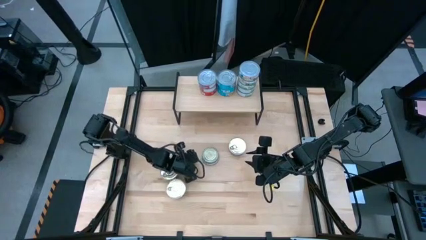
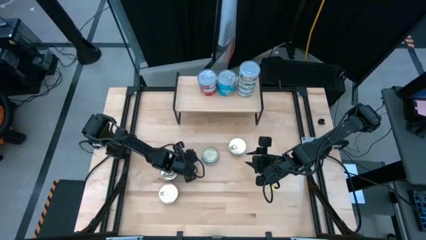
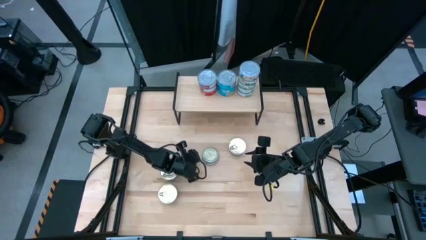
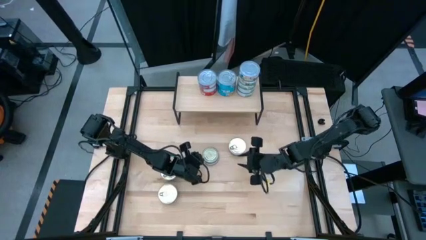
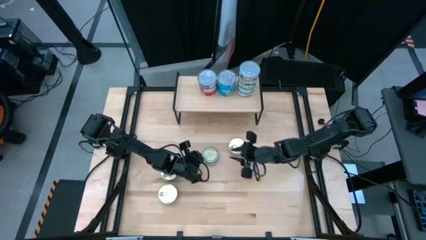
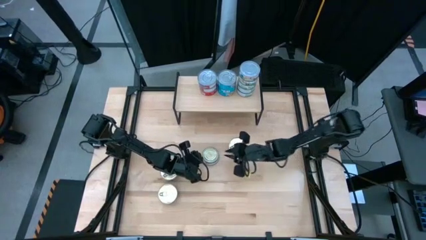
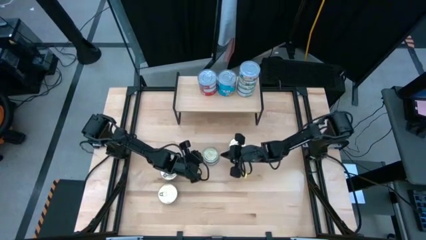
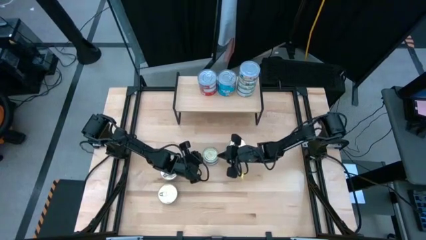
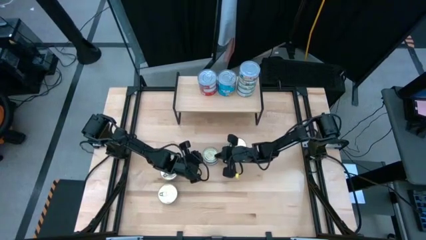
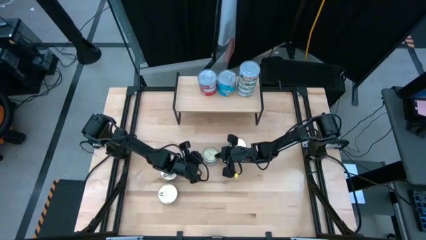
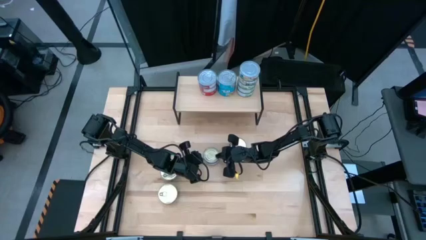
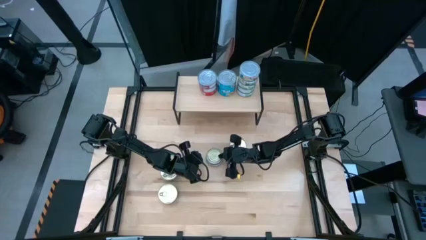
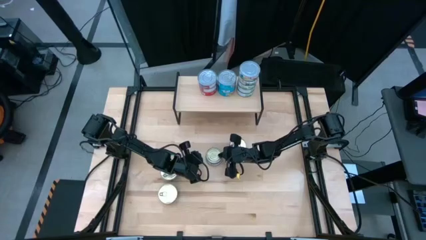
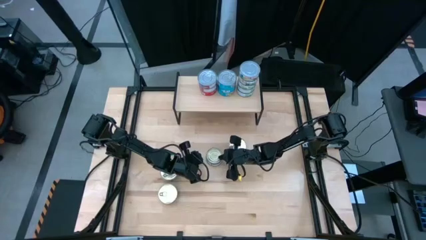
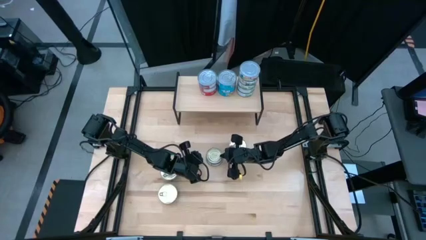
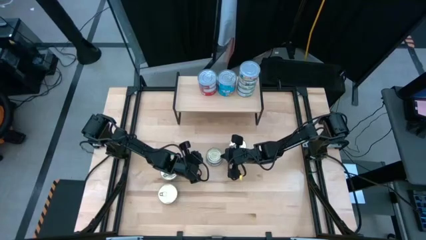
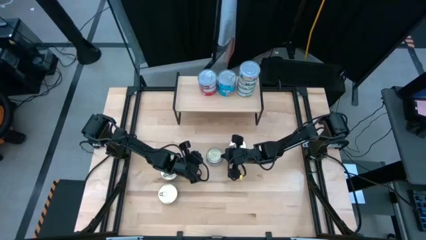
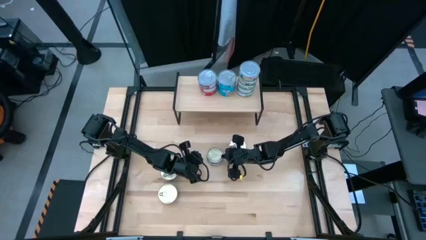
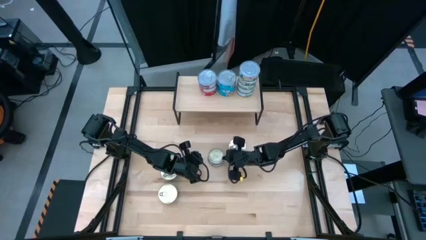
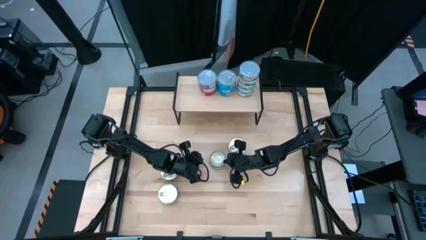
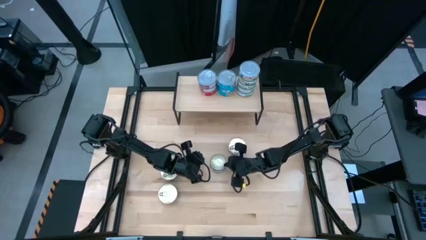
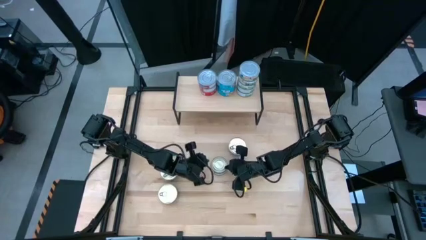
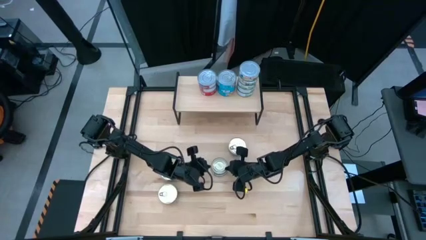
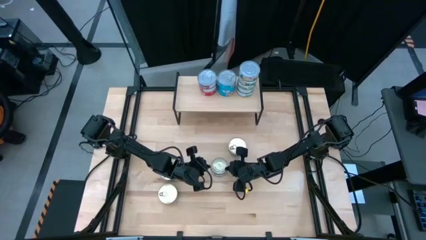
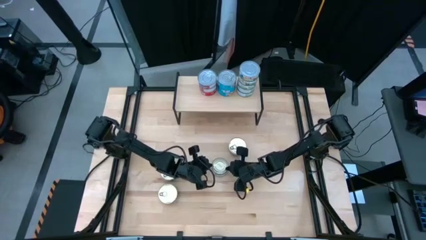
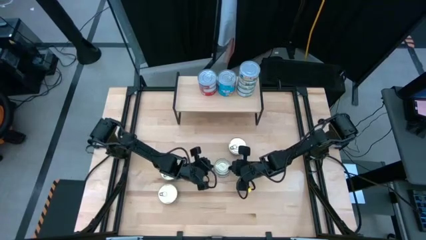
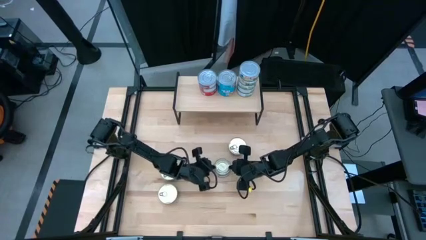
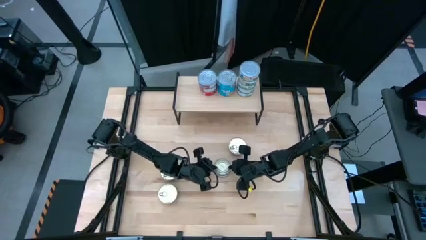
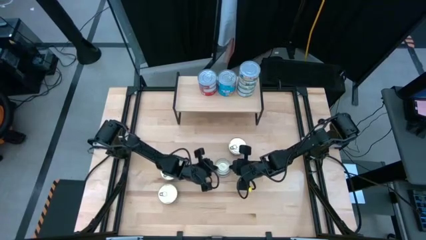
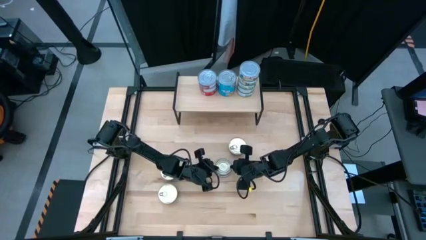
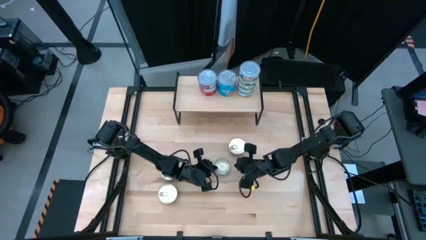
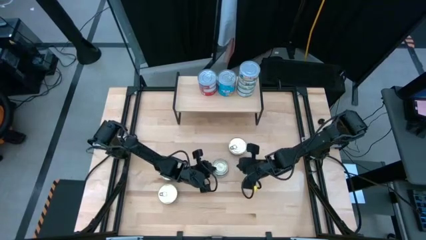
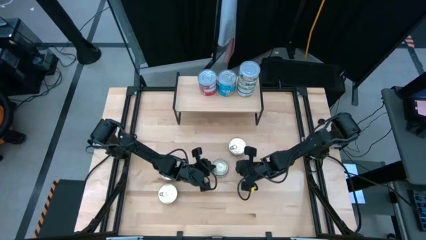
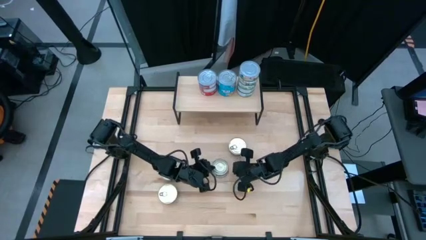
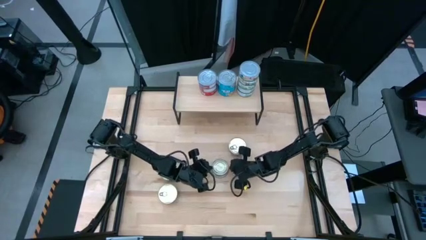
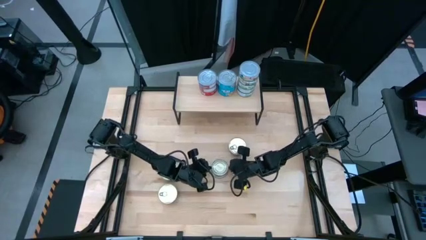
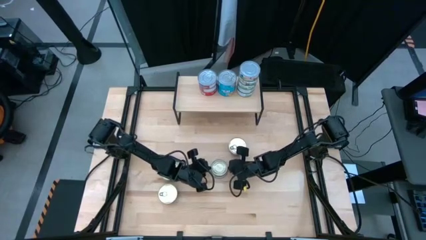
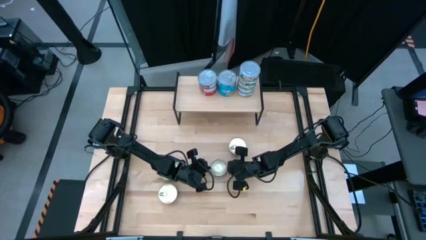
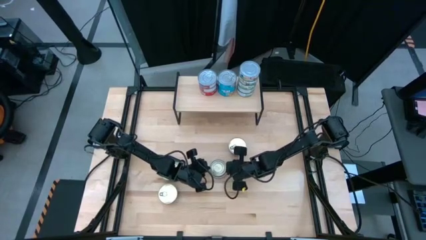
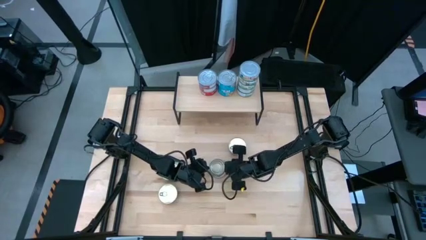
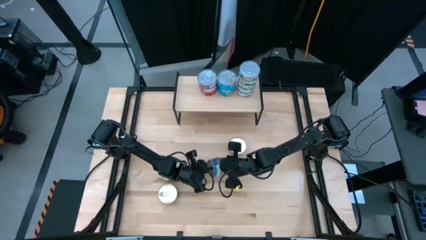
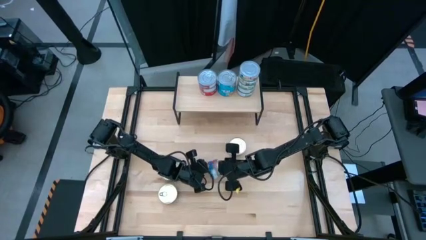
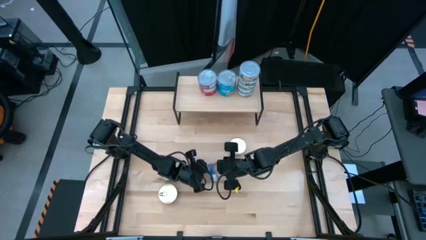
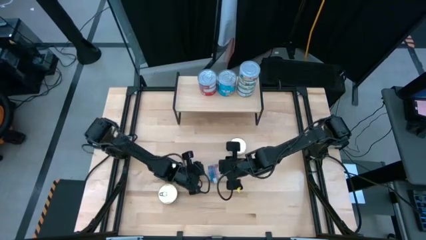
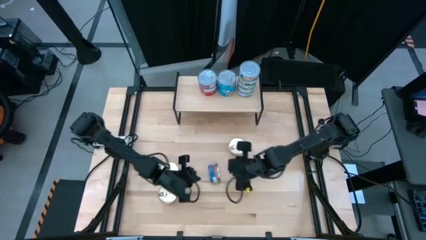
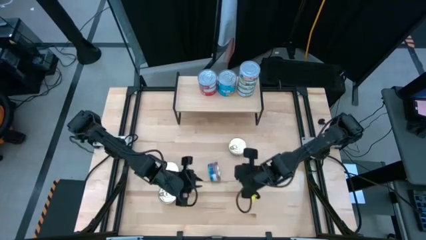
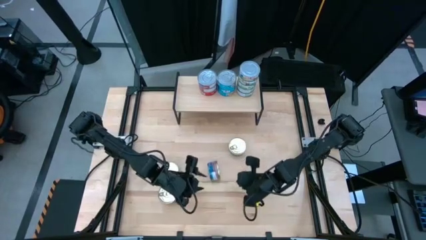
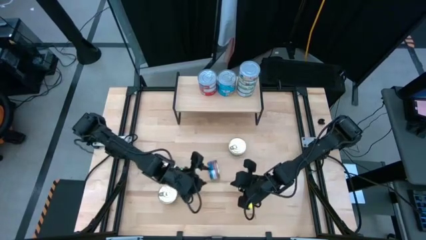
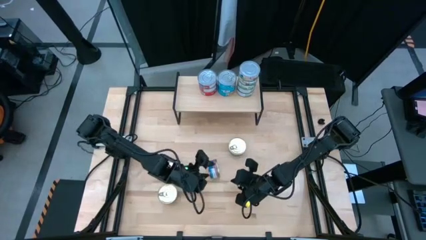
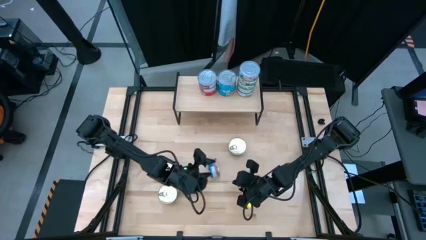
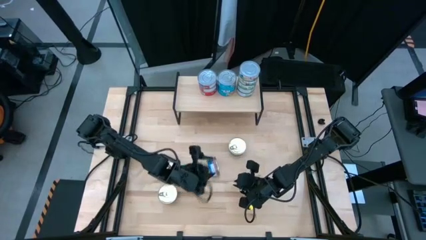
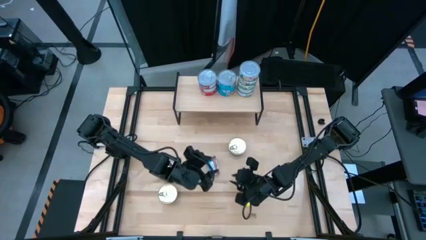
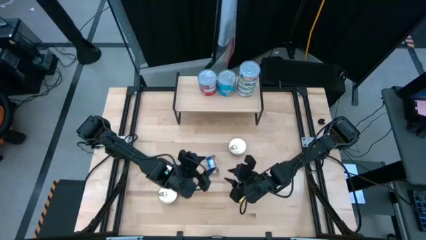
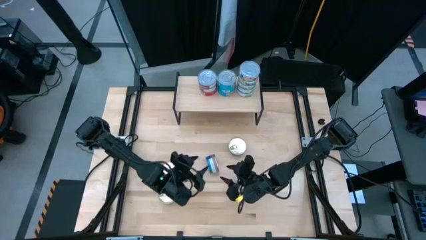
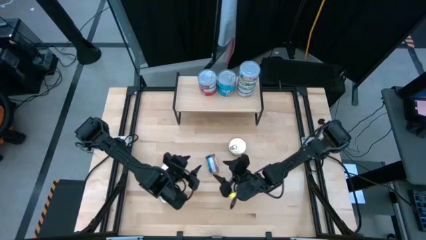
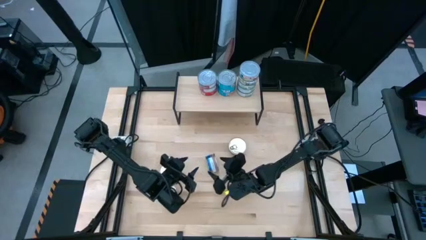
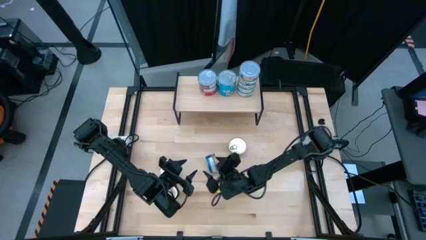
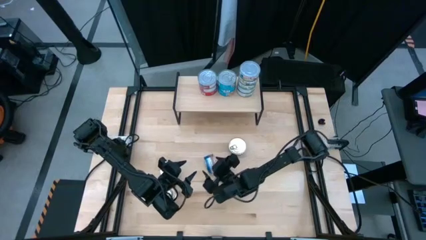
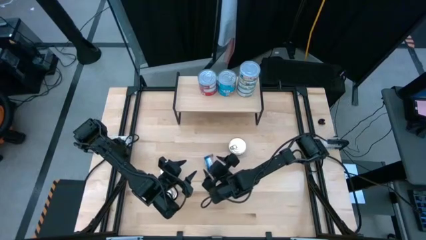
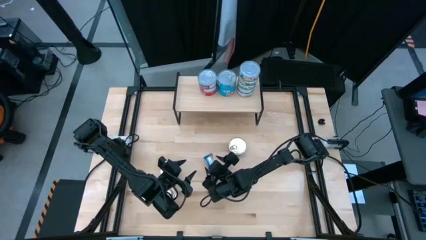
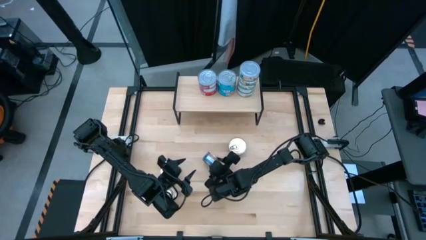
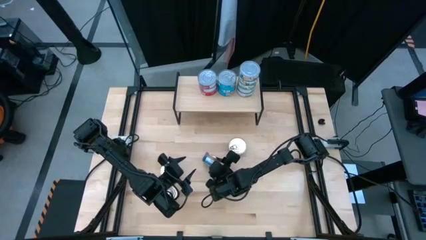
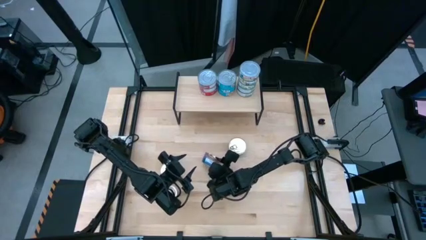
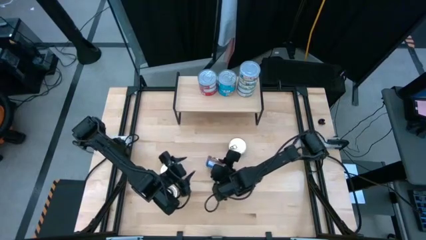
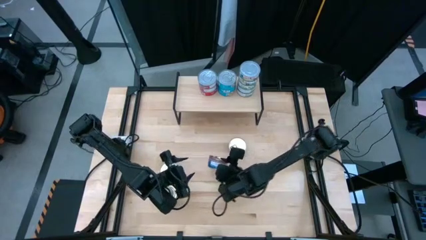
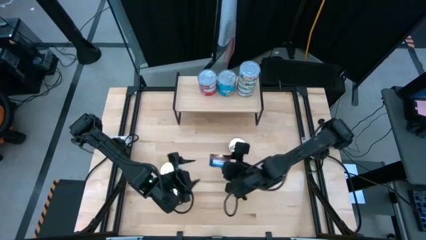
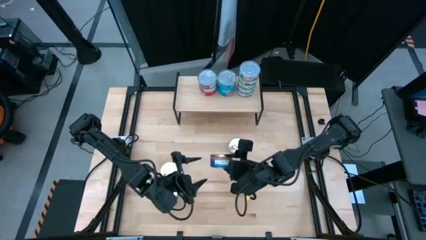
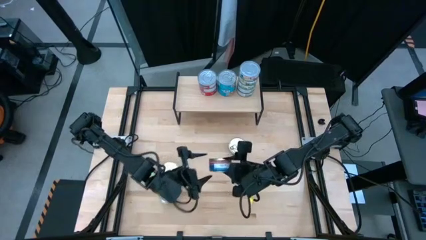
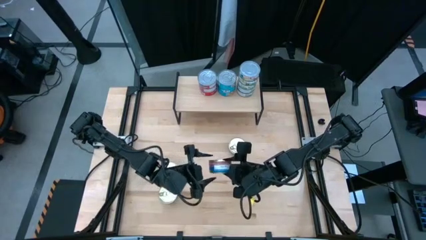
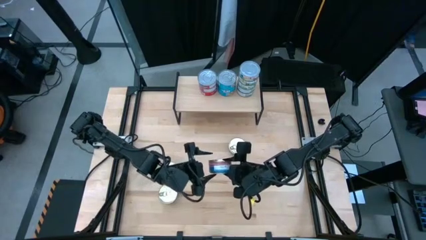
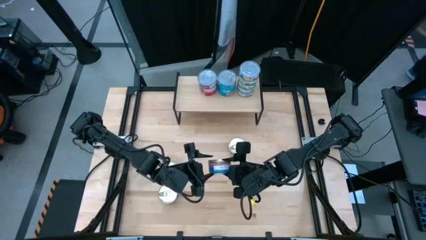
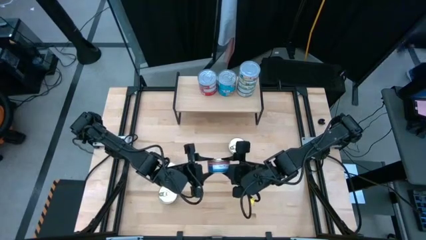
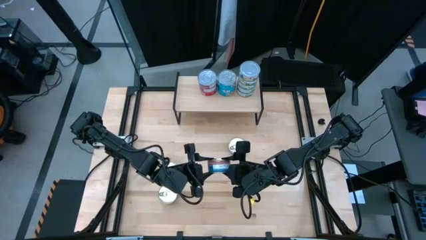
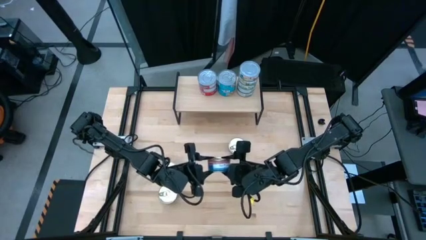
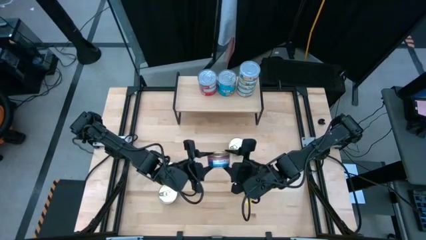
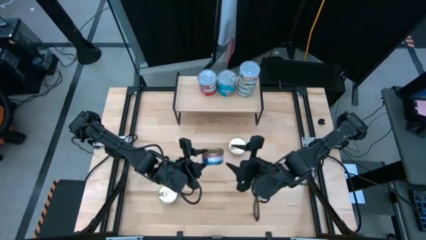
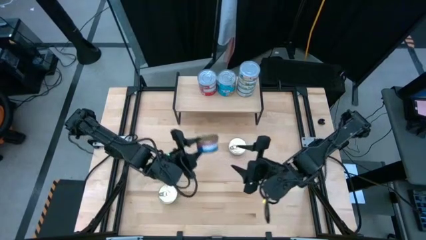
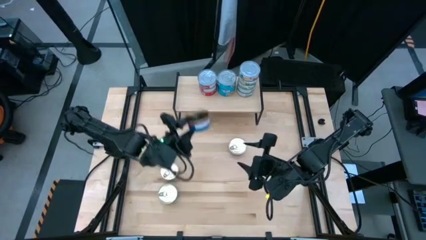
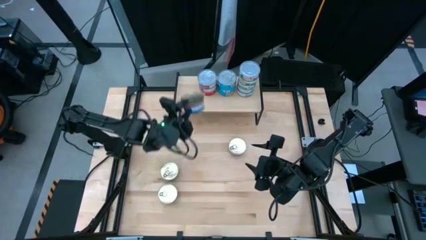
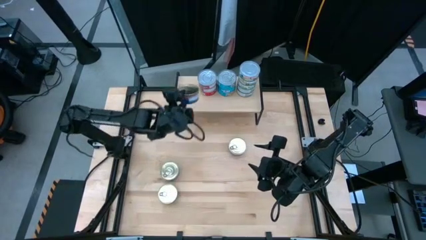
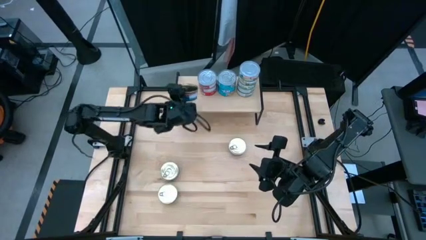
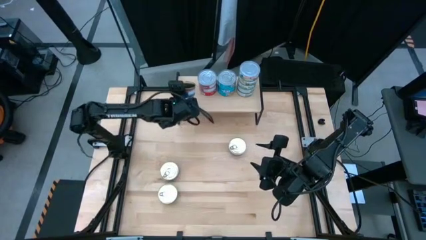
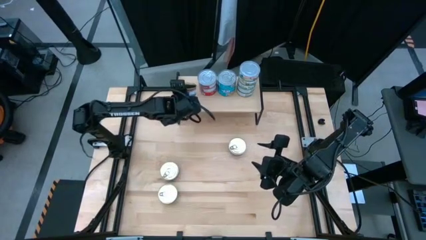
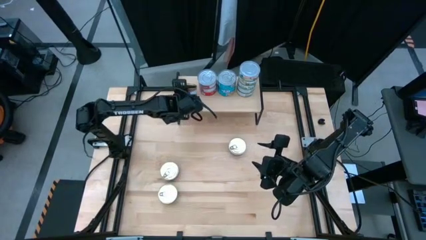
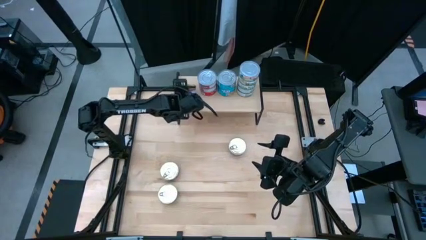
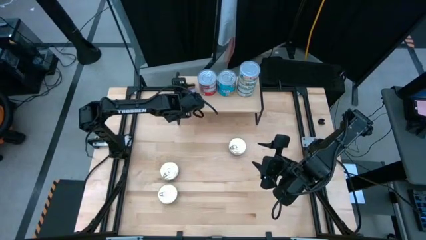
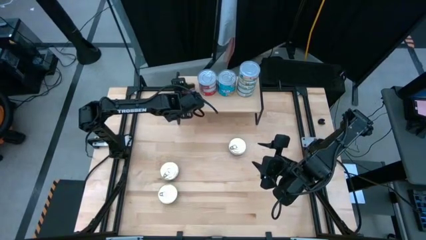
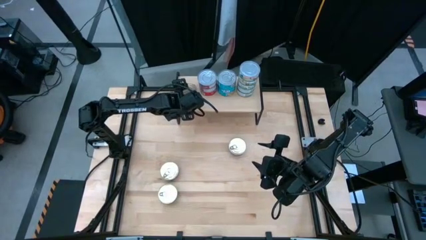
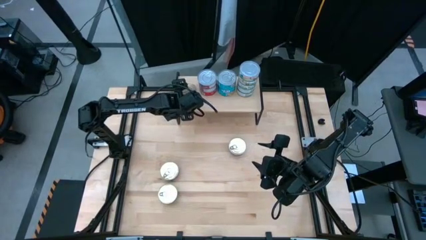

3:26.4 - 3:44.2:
Task: Stack canned seafood by type on shelf
Put the blue pink tuna can on the shelf
